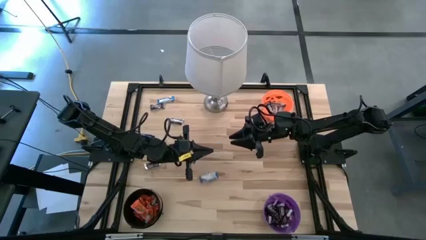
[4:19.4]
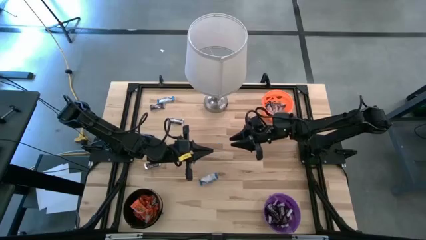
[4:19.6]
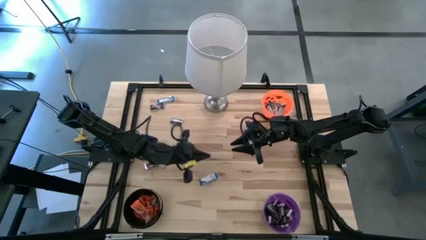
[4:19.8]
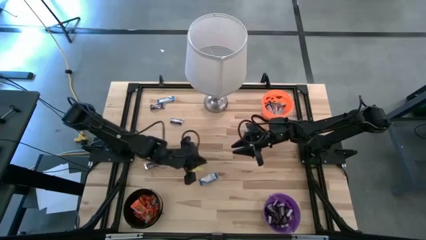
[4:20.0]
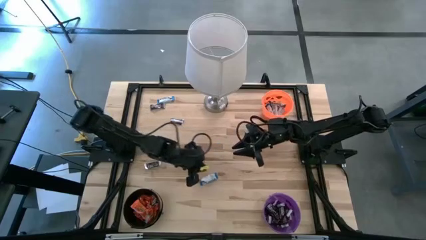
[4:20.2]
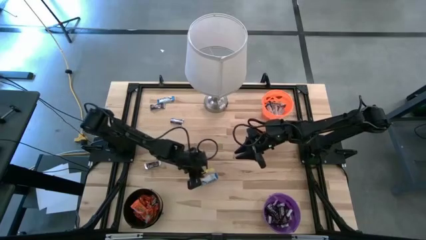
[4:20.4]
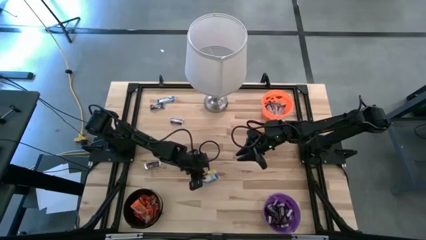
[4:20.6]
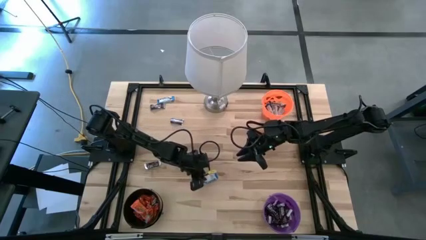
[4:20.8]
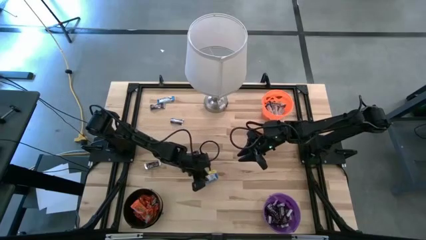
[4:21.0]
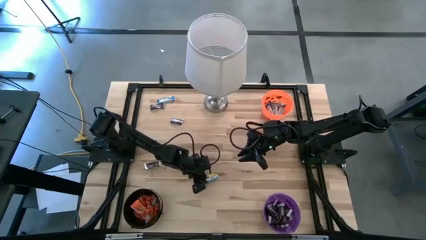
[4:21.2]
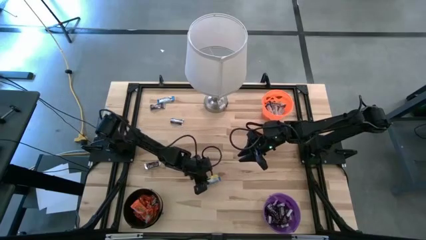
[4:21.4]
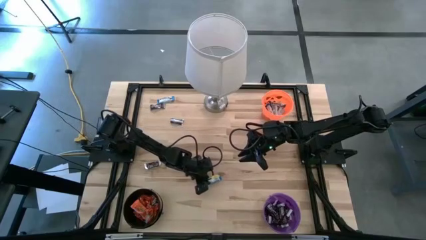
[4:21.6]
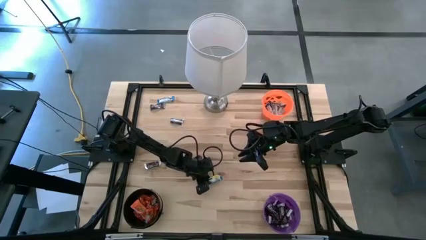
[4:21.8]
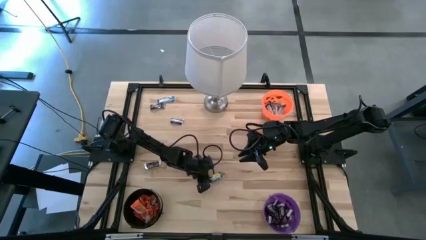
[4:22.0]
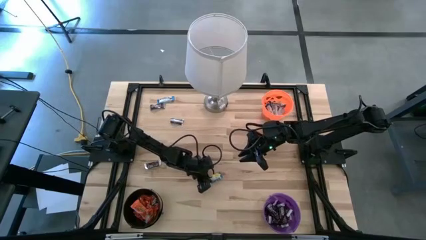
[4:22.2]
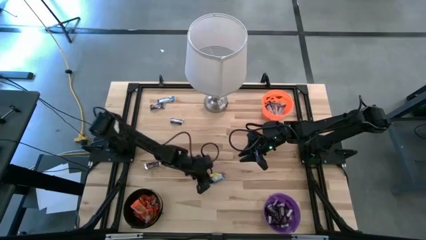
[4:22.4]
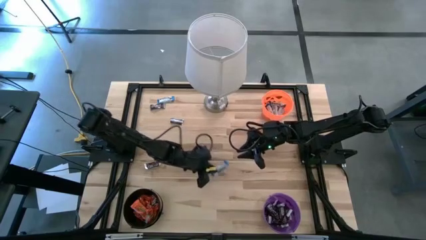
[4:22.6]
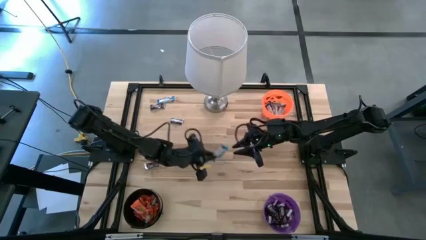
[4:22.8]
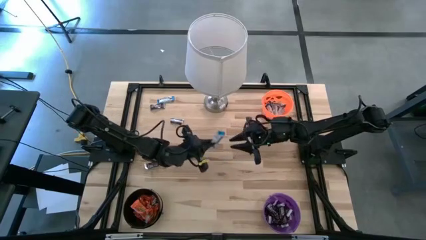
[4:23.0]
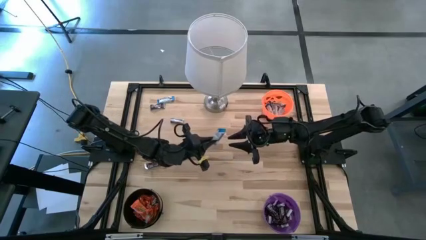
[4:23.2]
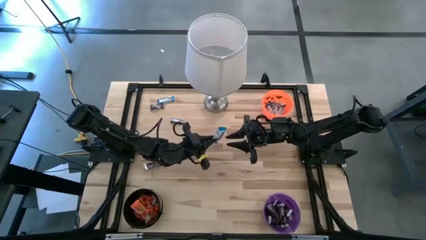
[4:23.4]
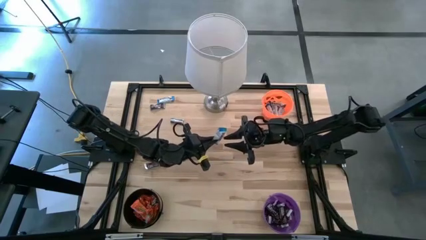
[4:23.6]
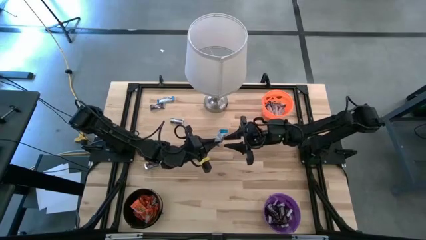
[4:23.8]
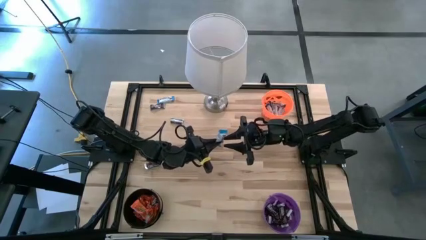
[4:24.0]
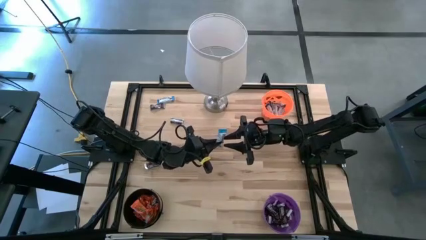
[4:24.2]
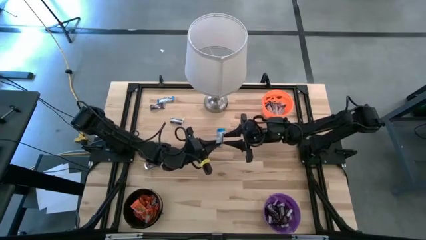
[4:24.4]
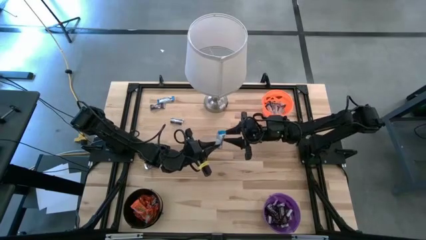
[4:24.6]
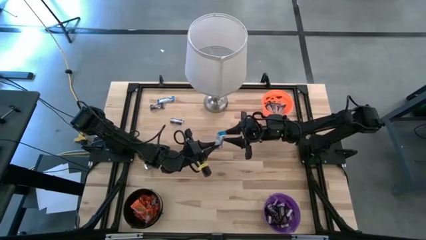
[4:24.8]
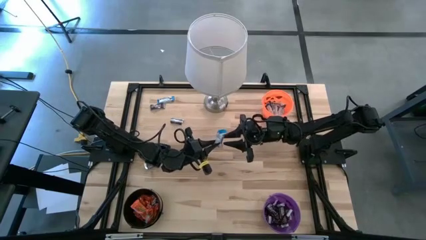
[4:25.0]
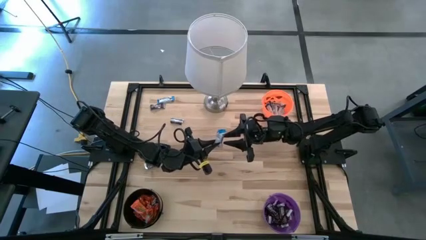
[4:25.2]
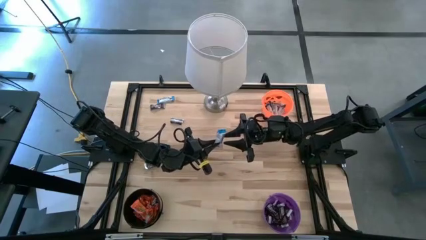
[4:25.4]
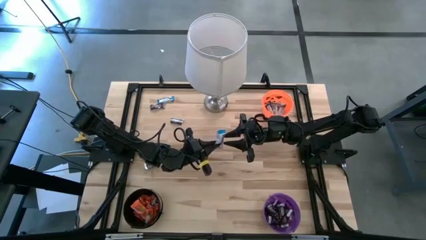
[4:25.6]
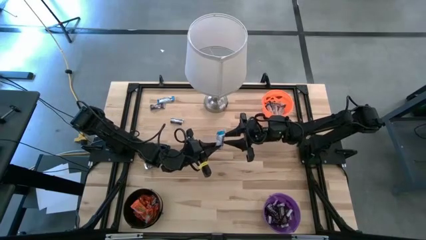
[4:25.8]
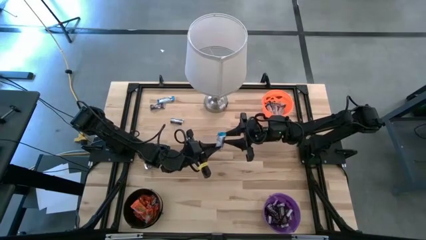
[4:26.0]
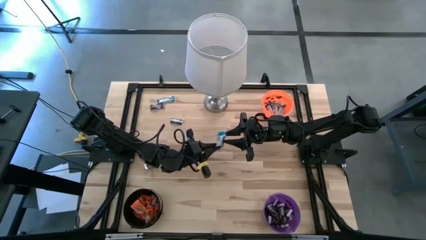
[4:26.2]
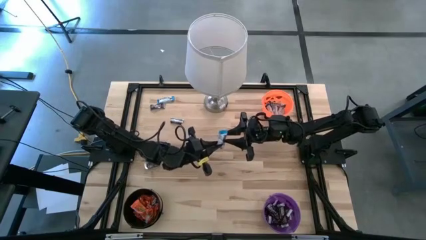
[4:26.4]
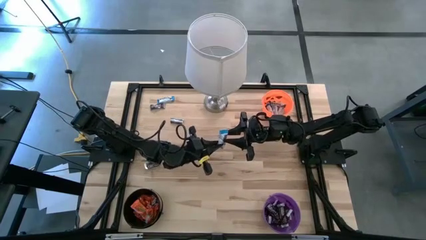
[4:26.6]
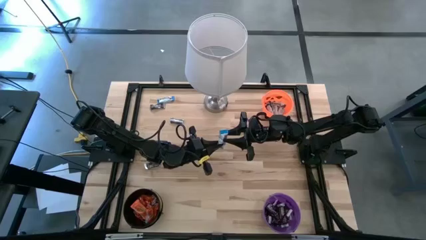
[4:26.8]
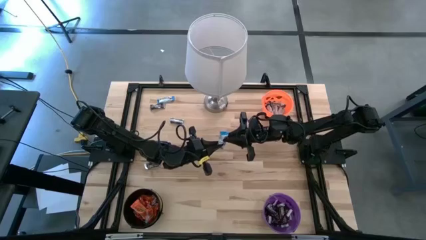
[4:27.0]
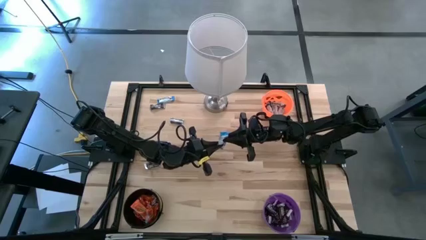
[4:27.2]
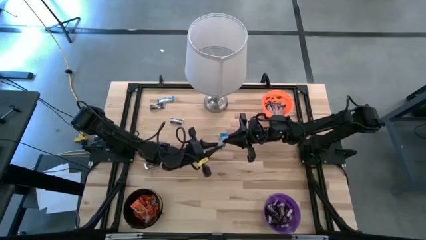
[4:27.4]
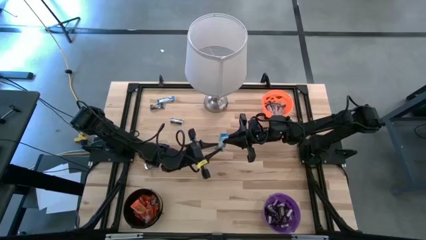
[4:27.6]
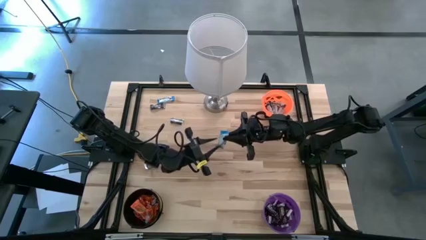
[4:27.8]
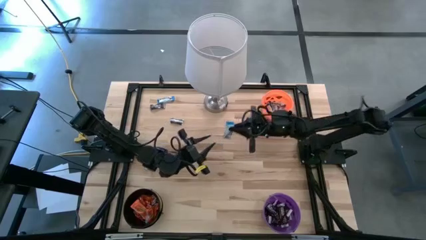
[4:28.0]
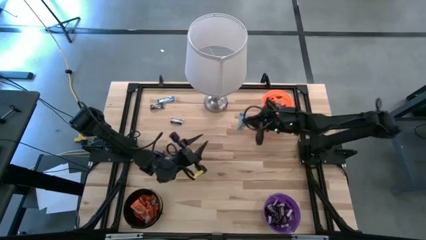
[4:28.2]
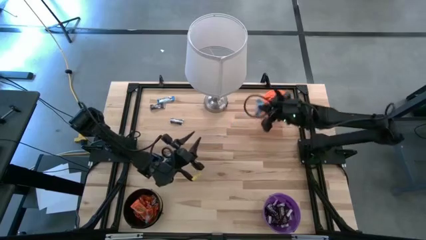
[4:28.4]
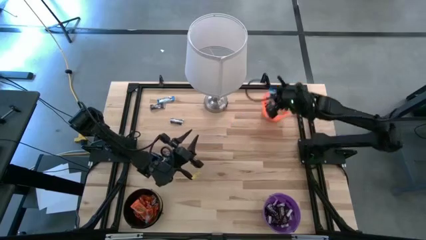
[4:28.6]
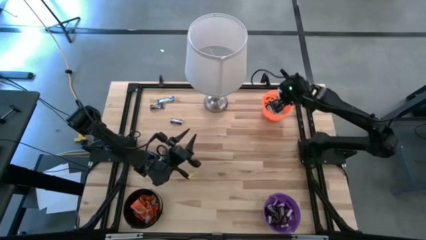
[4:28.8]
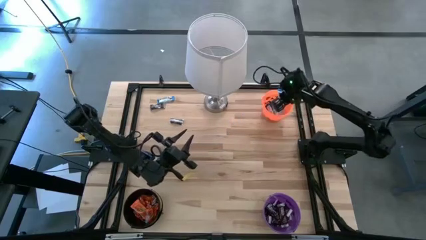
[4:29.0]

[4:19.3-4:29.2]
Task: Sort candy
Put the white chocolate bar into the orange bucket

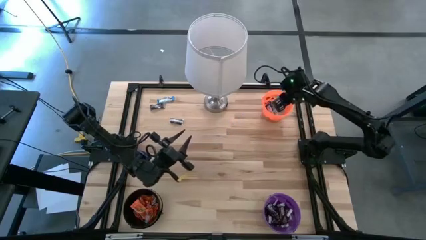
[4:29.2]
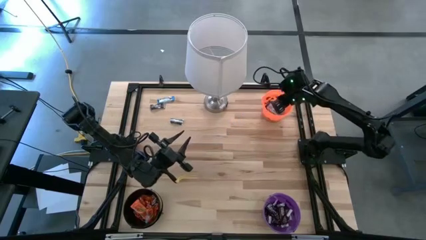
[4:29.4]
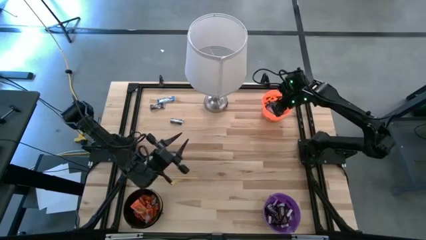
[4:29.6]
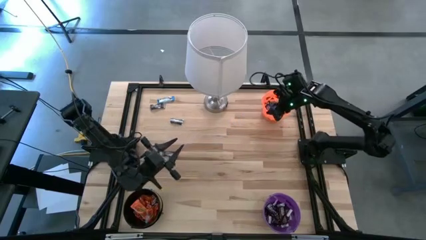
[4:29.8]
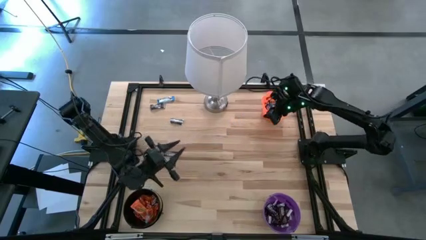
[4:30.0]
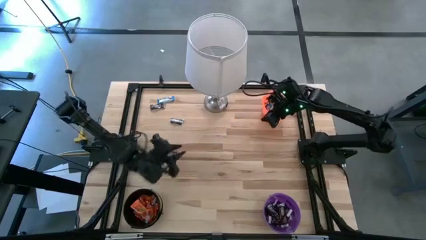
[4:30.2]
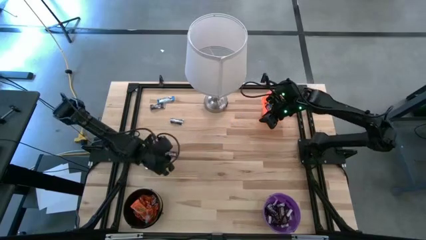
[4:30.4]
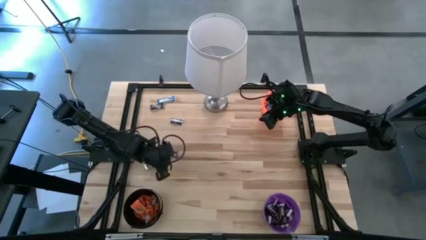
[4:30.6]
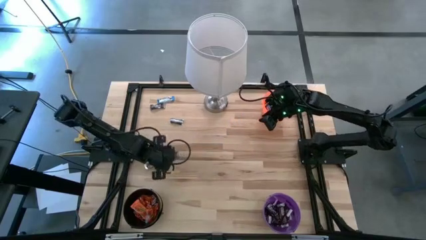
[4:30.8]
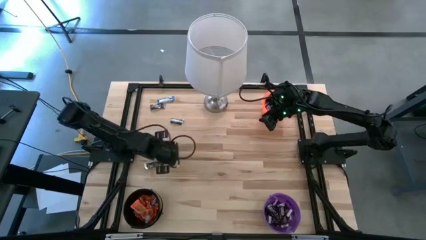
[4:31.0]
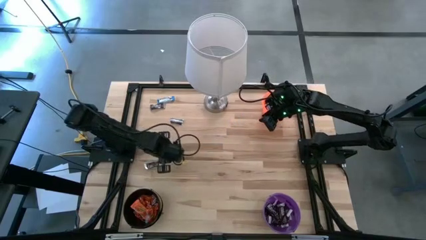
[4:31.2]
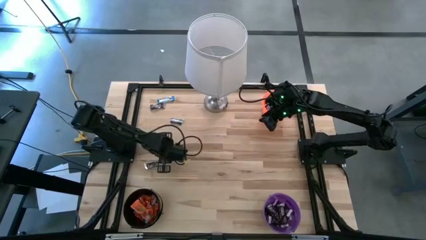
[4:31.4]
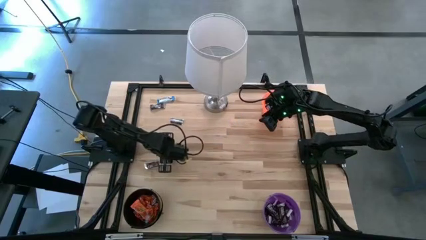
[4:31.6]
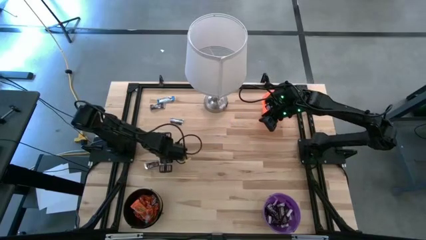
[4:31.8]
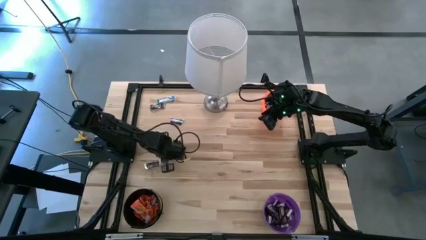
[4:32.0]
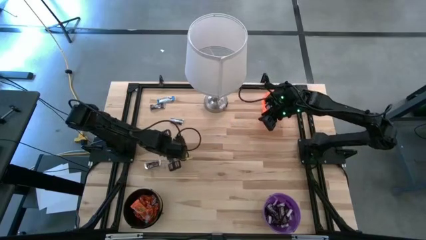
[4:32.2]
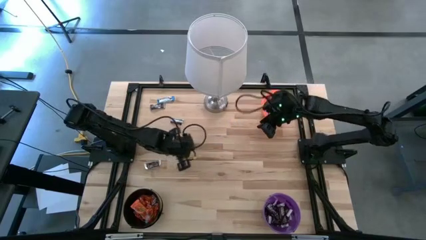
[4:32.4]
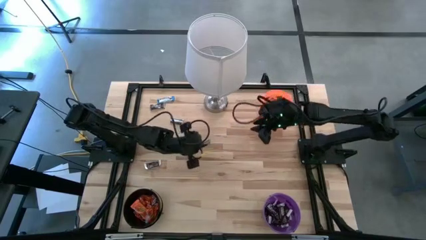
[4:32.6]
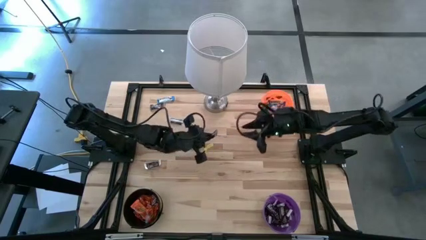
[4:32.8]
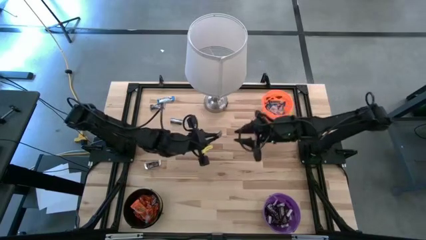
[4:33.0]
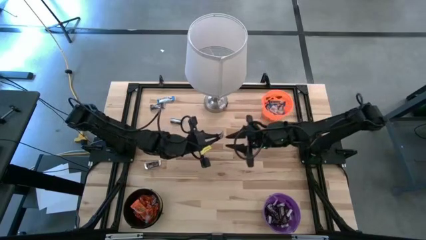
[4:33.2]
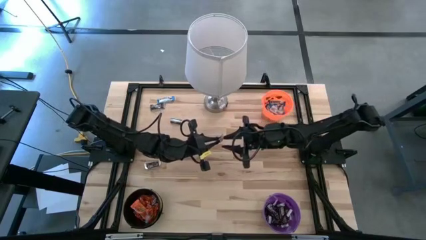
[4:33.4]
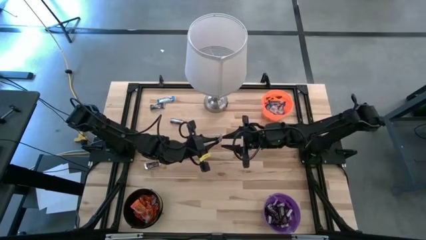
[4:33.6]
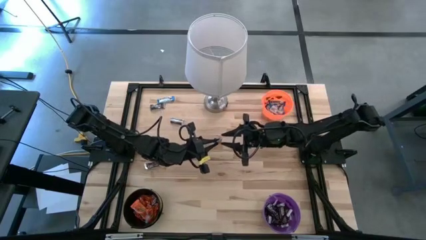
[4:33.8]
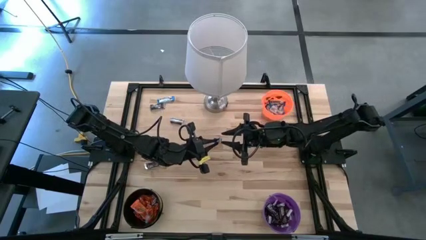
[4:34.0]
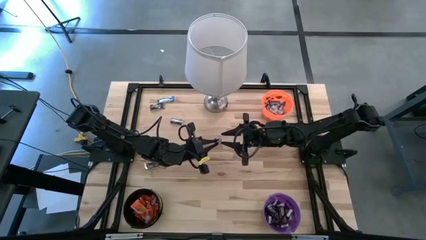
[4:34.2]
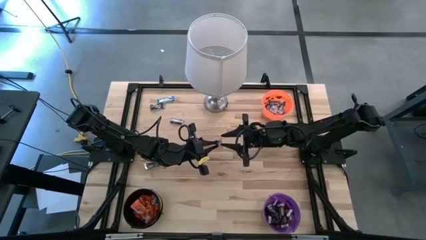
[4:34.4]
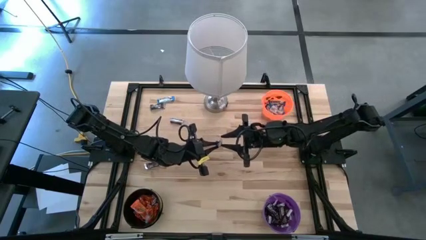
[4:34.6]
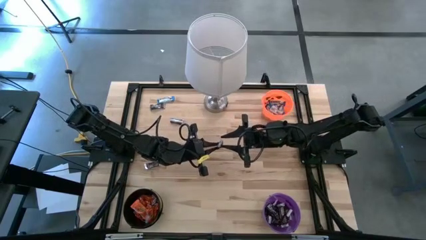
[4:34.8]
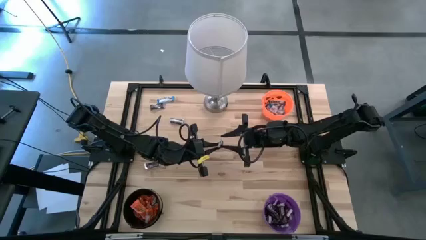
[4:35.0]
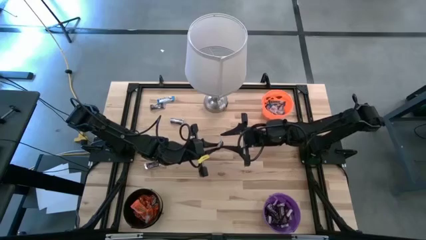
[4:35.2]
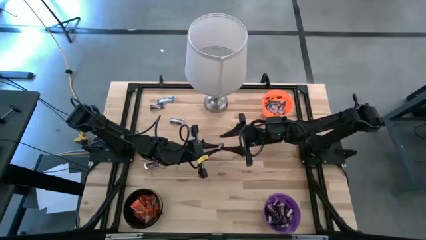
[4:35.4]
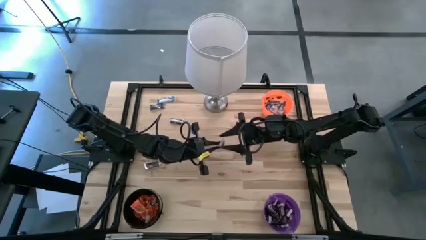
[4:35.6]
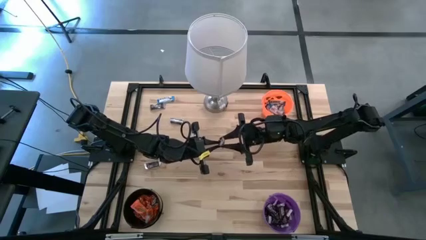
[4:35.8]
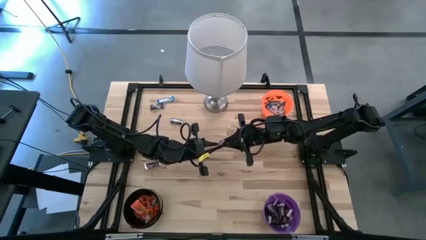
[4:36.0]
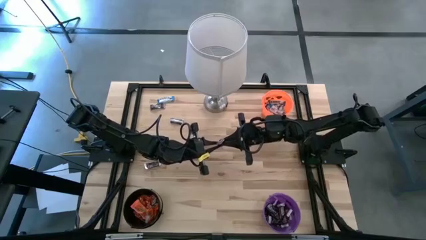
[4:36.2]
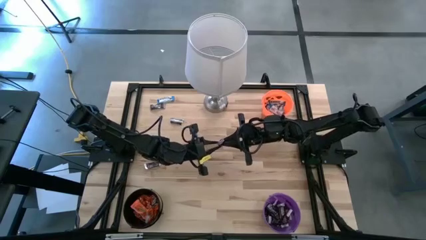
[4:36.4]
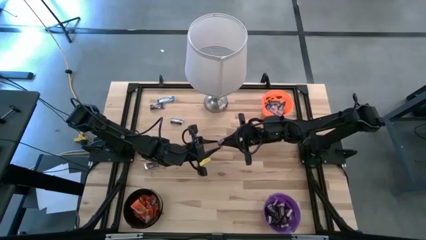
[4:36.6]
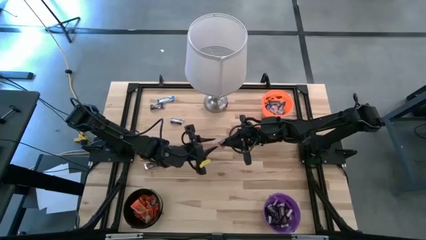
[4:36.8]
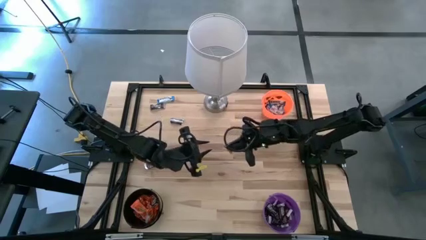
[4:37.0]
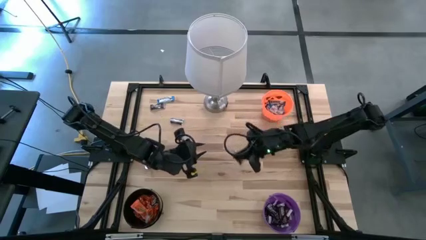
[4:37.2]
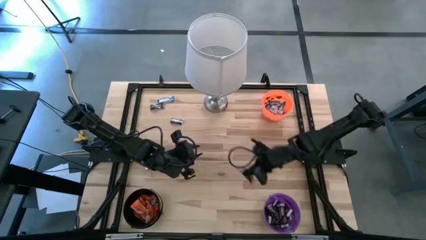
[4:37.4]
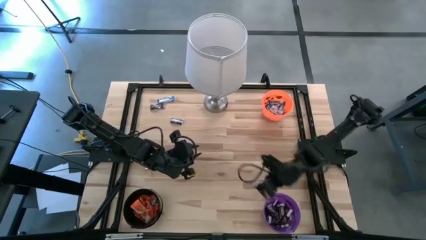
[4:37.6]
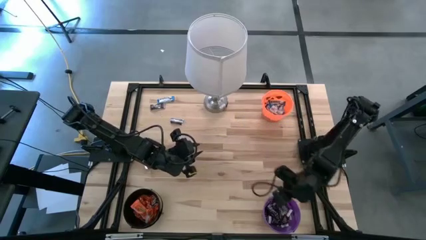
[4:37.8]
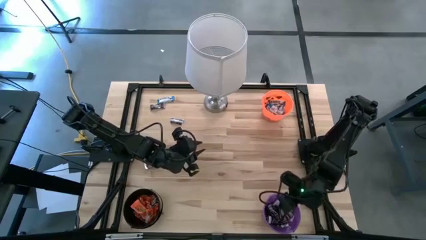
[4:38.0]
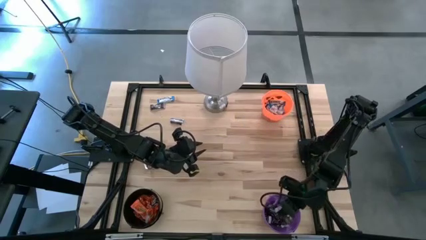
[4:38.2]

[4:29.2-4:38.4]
Put the brown chocolate bar into the violet bucket
